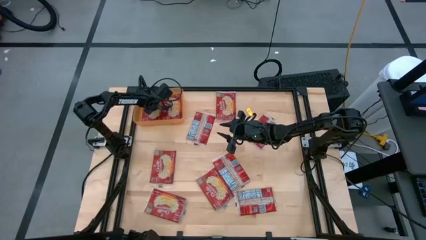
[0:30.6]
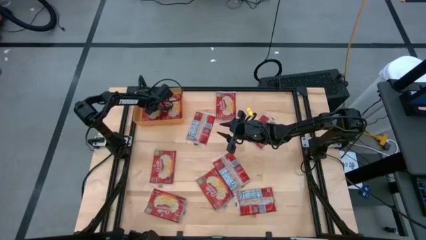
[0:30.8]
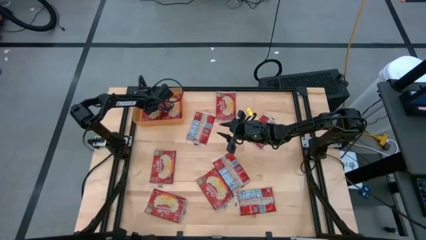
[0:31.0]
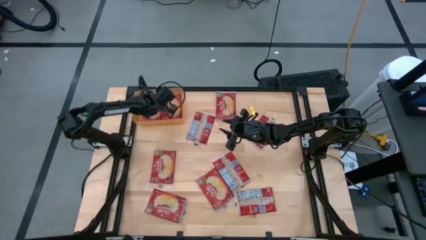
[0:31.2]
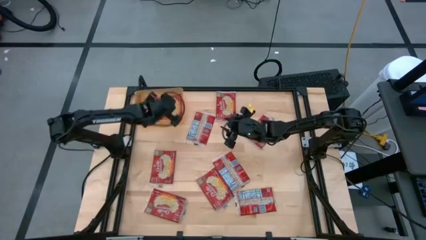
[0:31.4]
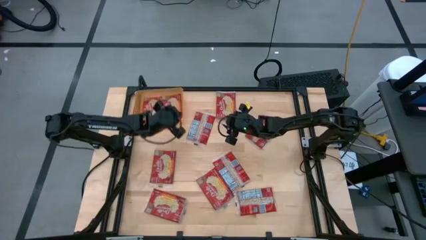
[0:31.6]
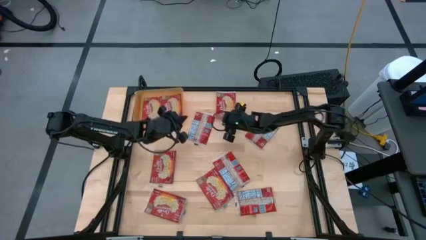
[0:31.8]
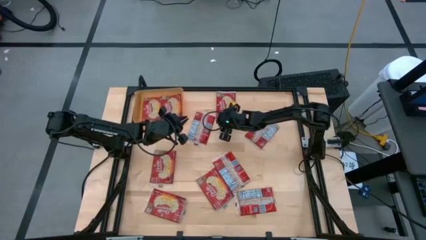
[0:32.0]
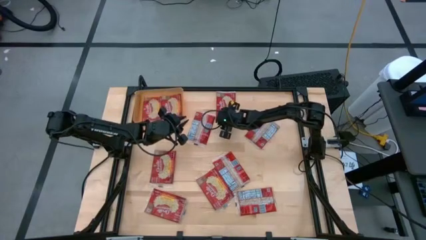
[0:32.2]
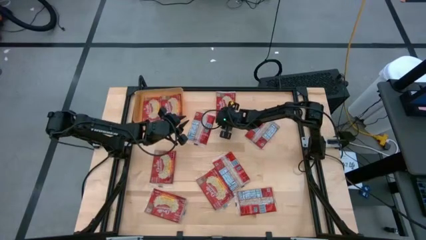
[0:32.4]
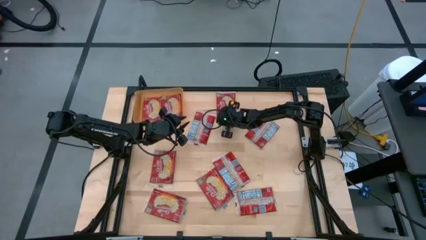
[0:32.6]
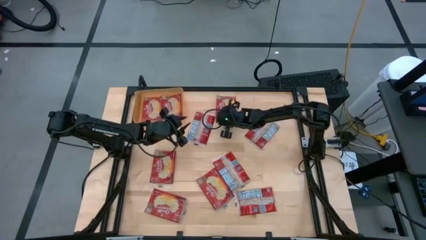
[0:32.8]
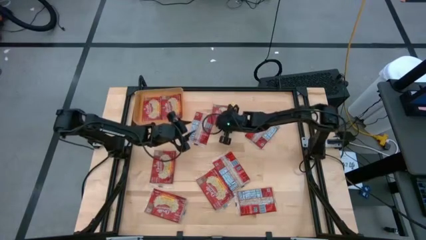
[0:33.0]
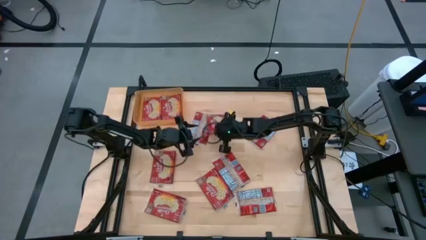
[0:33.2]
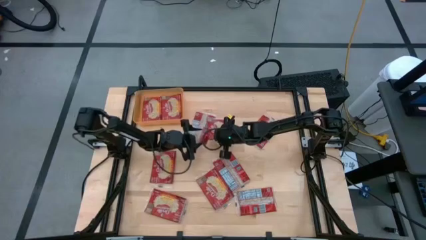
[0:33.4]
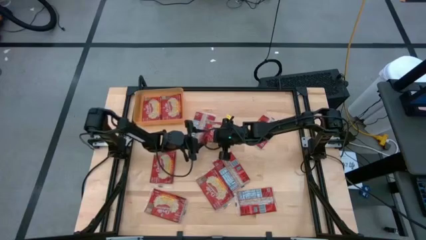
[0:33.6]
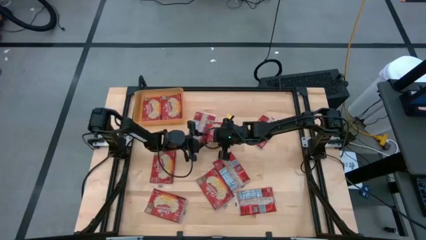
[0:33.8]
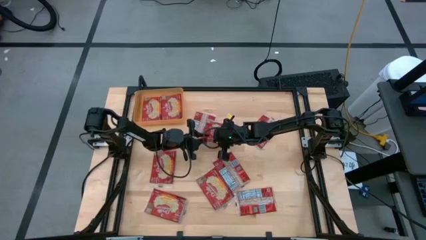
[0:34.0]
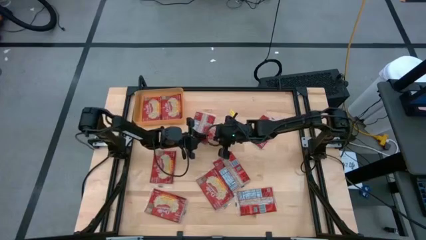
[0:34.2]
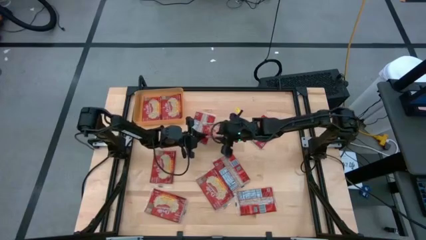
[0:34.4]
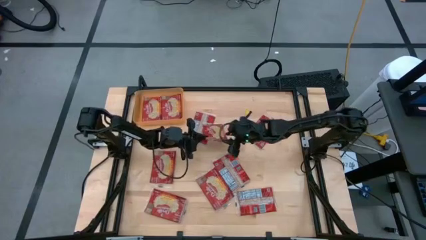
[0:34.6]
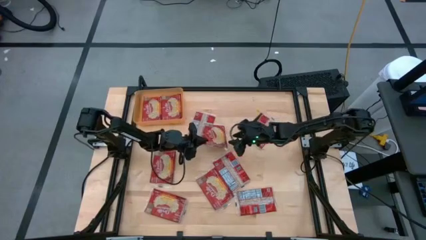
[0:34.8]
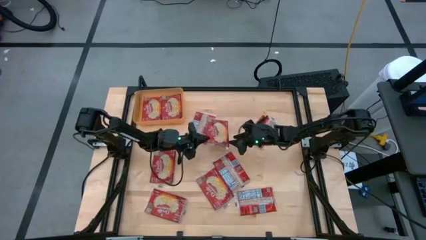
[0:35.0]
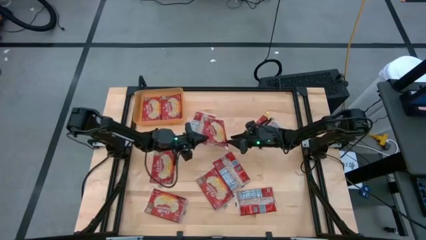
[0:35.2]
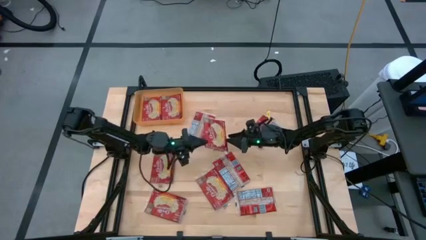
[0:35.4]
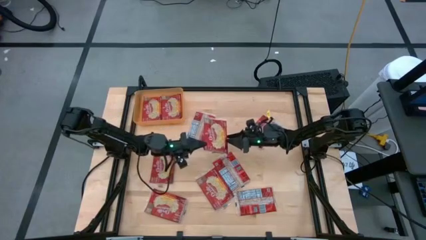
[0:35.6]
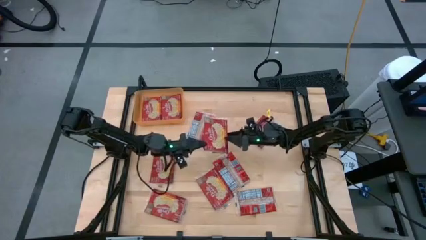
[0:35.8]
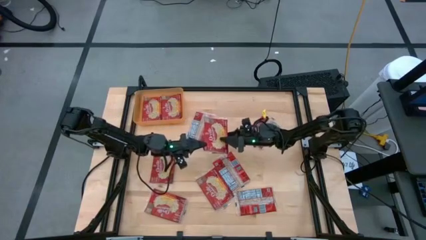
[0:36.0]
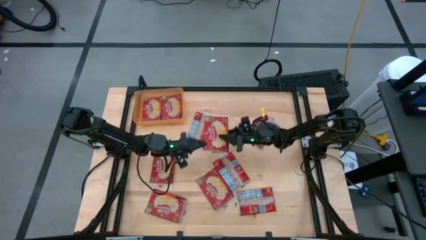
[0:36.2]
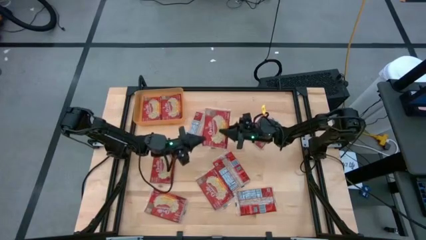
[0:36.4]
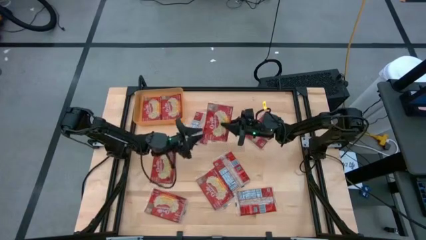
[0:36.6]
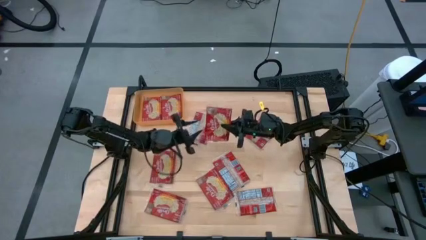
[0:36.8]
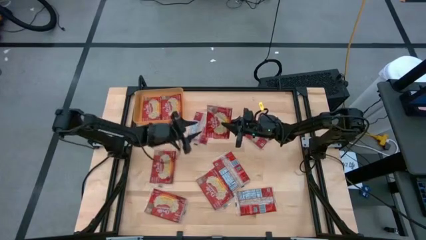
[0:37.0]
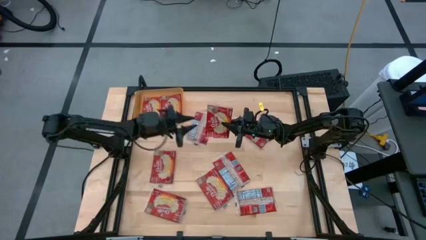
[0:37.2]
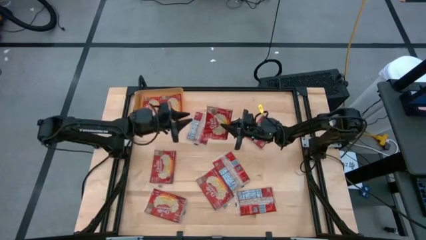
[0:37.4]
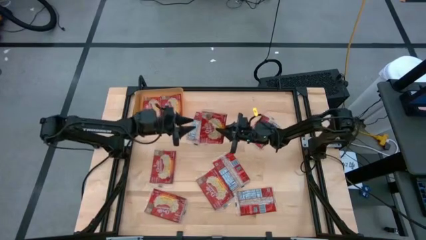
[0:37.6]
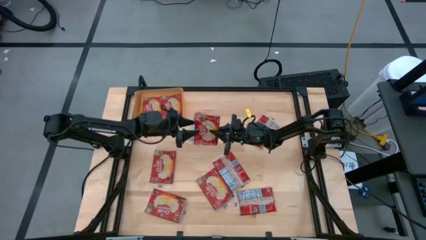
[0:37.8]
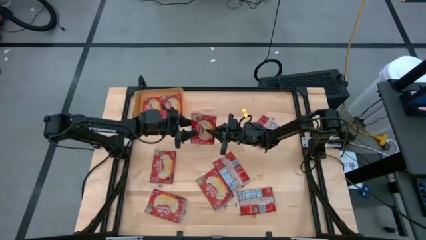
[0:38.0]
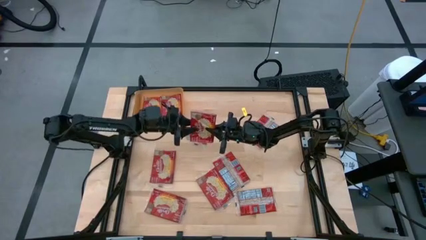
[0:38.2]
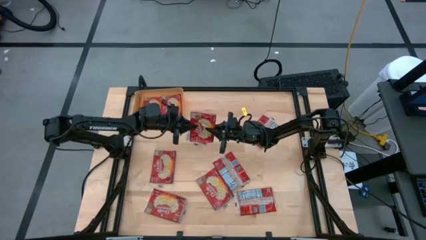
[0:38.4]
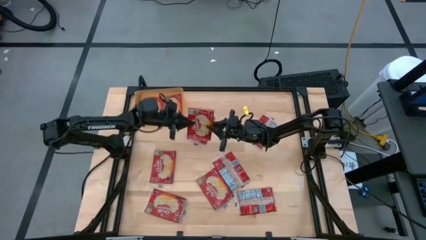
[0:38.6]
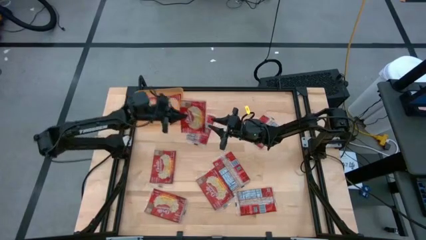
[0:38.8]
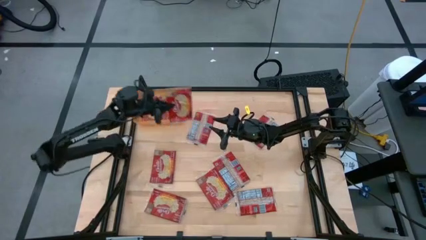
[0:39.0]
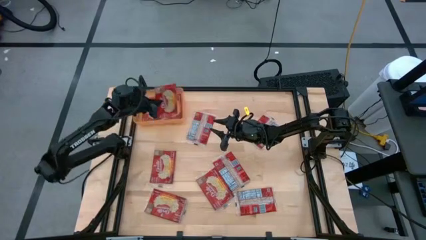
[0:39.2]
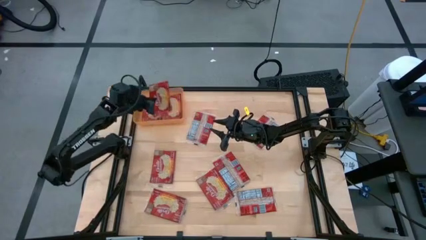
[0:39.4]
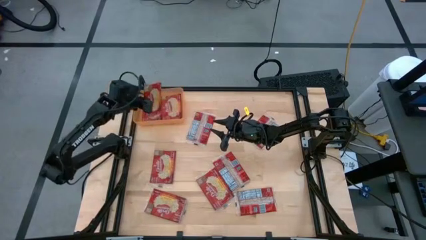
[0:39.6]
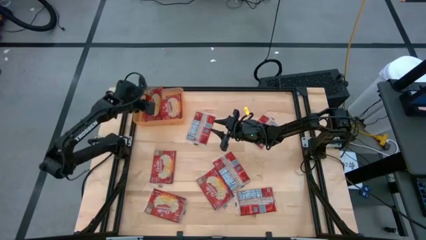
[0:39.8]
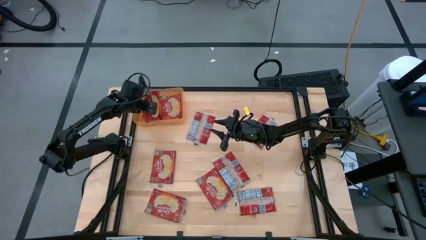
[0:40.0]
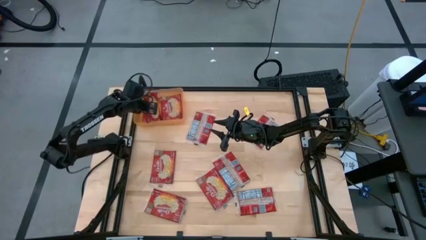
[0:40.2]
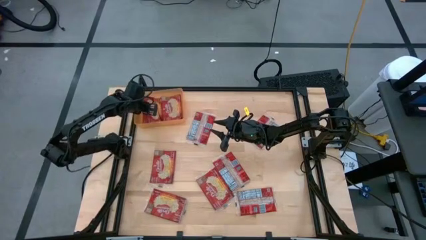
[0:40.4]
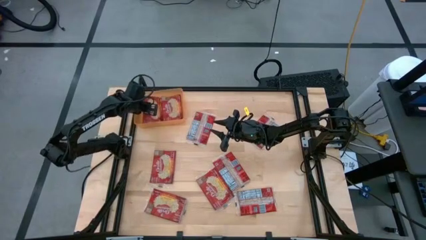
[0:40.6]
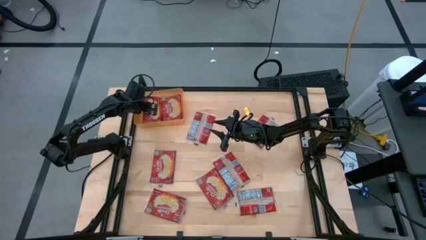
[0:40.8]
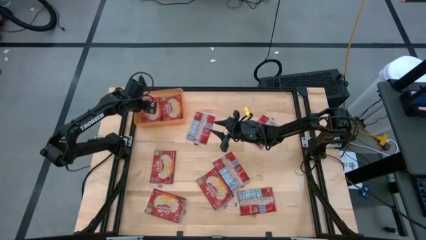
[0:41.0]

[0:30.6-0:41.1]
Task: Sort popcorn bags into baskets
Put the red popcorn bag into the orange bin
